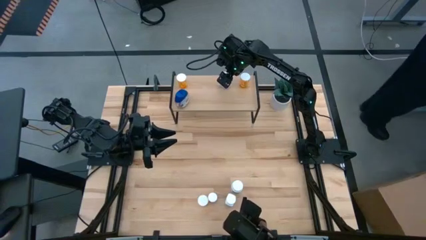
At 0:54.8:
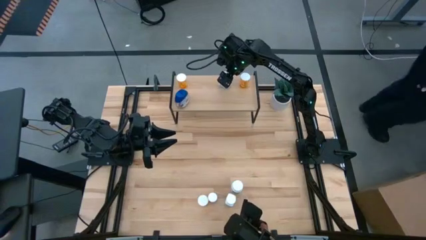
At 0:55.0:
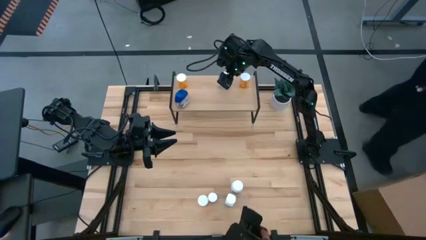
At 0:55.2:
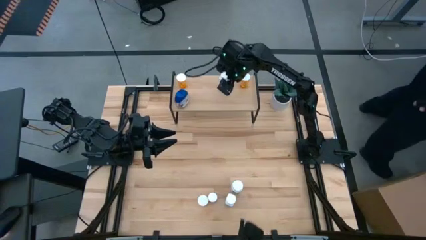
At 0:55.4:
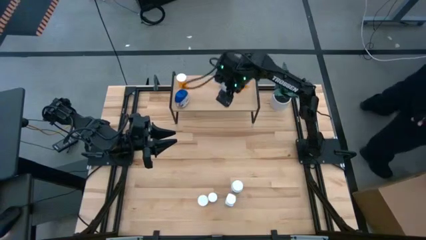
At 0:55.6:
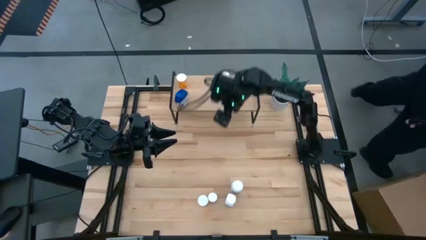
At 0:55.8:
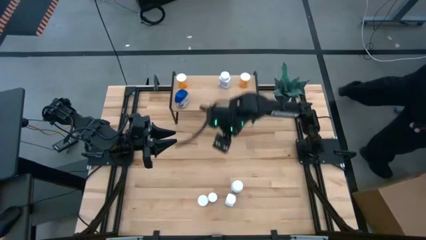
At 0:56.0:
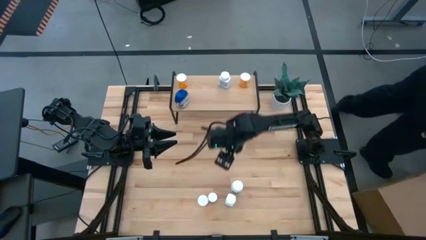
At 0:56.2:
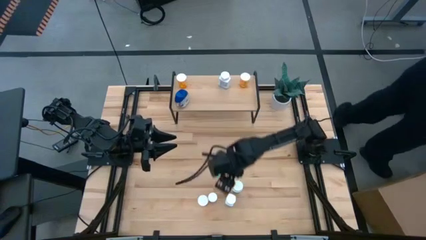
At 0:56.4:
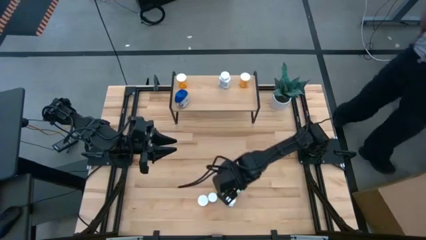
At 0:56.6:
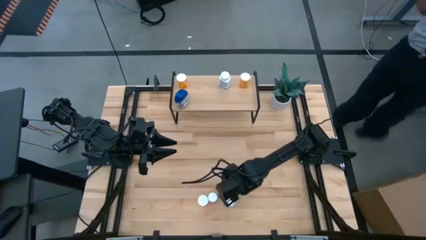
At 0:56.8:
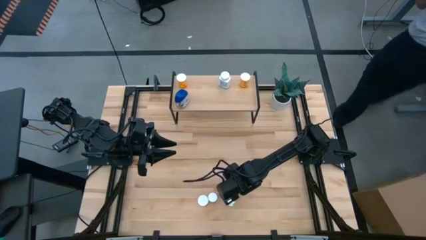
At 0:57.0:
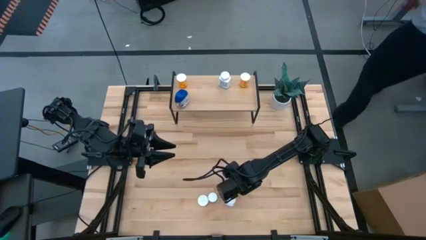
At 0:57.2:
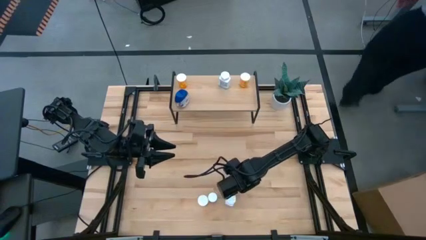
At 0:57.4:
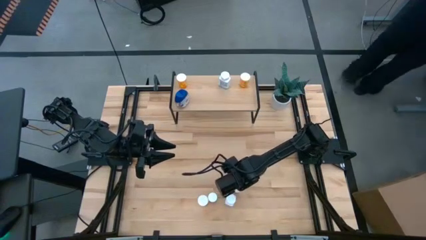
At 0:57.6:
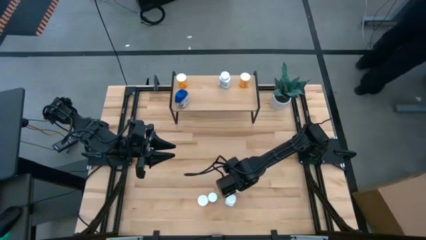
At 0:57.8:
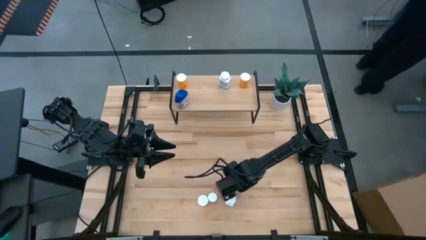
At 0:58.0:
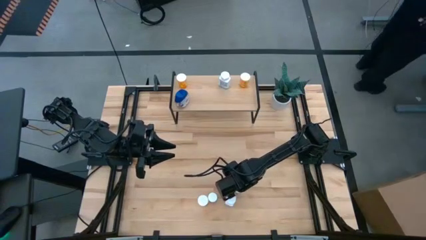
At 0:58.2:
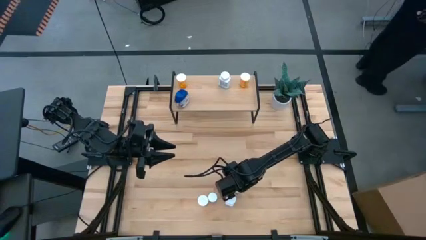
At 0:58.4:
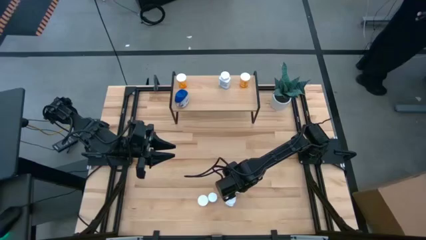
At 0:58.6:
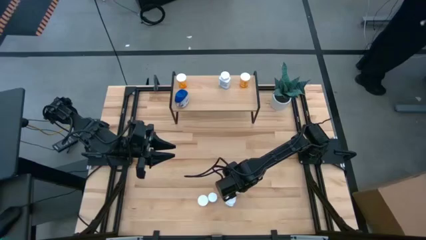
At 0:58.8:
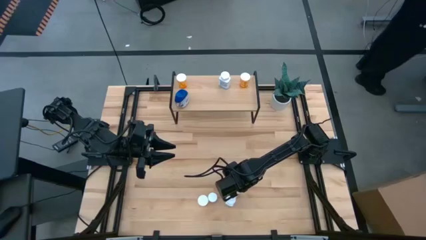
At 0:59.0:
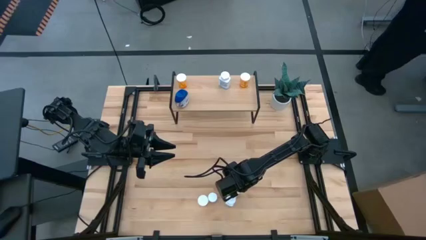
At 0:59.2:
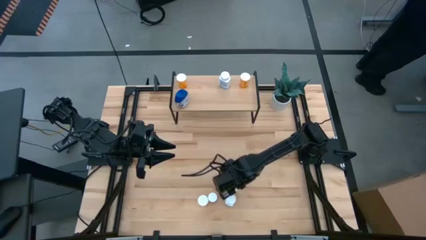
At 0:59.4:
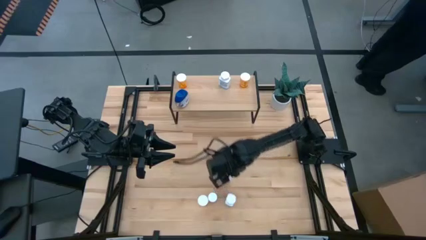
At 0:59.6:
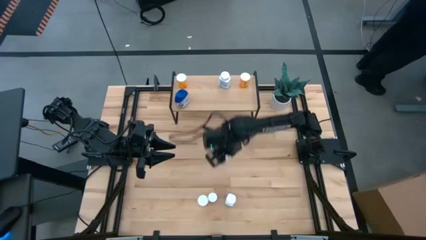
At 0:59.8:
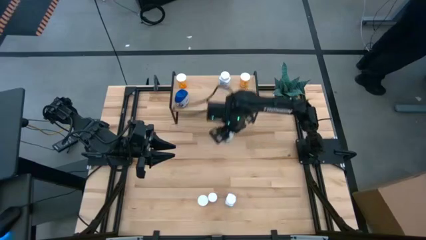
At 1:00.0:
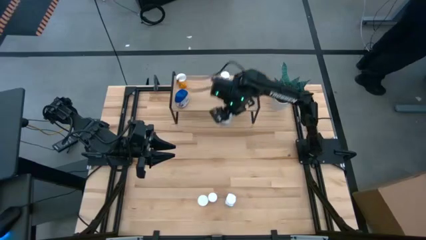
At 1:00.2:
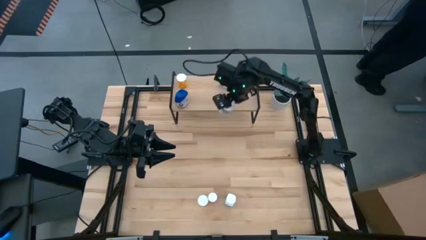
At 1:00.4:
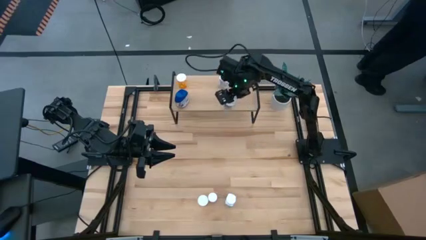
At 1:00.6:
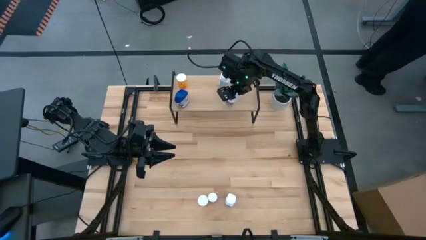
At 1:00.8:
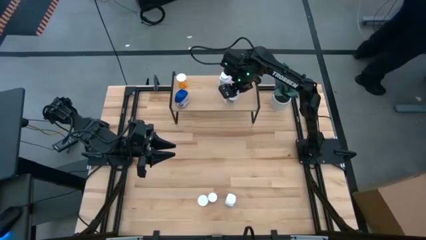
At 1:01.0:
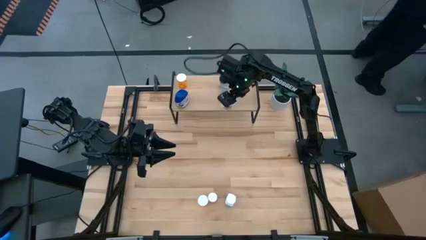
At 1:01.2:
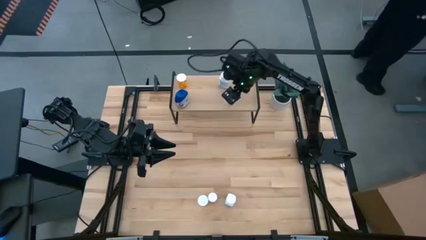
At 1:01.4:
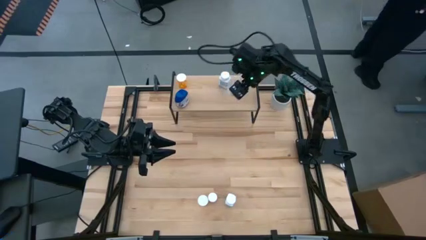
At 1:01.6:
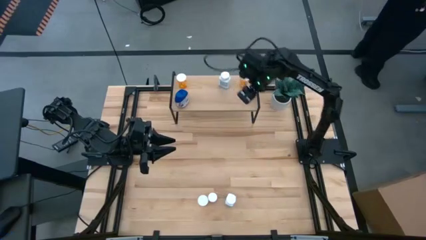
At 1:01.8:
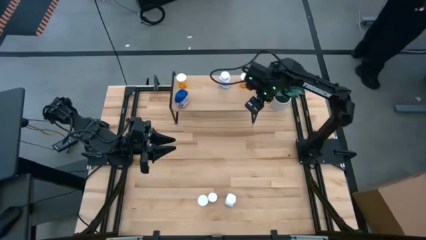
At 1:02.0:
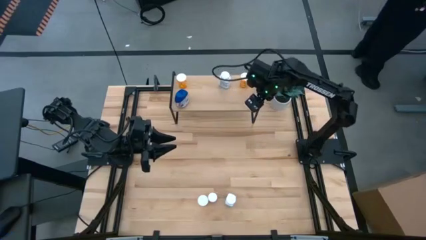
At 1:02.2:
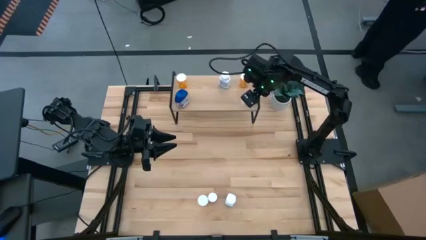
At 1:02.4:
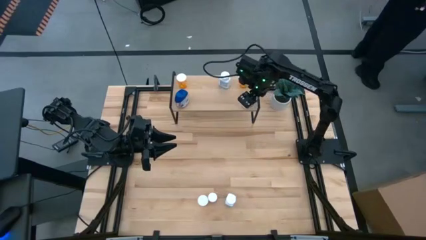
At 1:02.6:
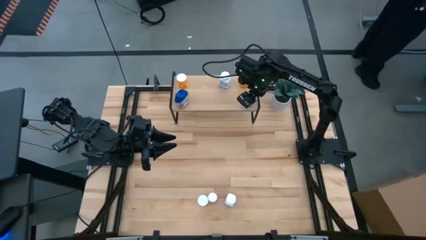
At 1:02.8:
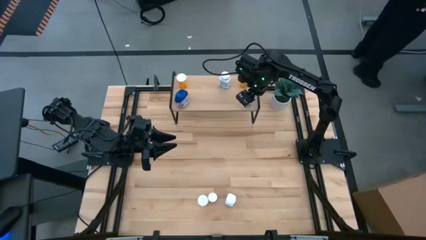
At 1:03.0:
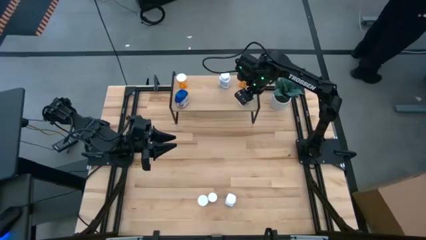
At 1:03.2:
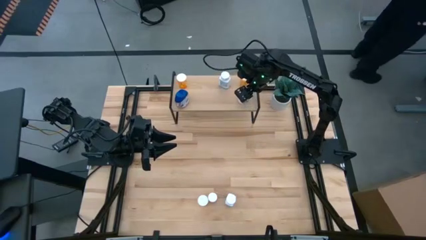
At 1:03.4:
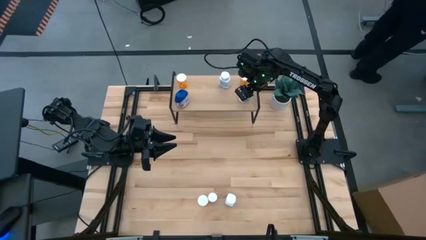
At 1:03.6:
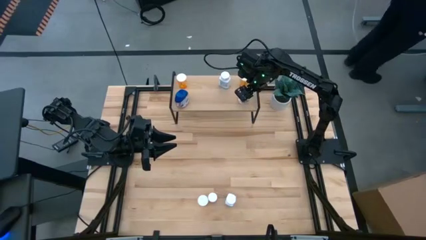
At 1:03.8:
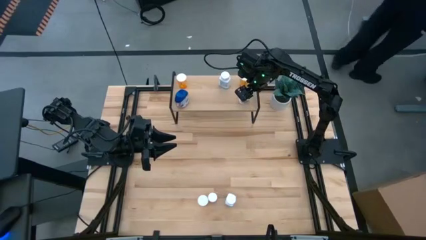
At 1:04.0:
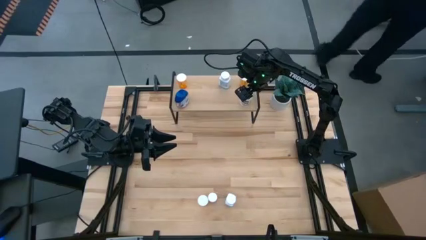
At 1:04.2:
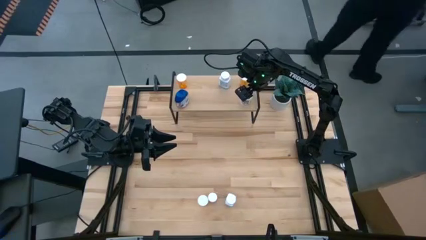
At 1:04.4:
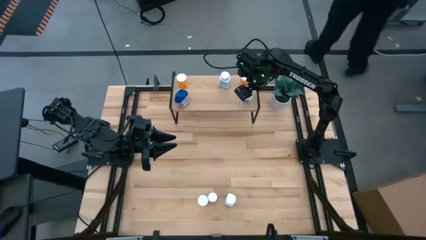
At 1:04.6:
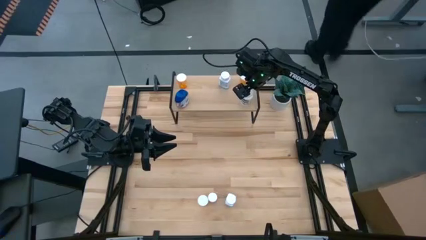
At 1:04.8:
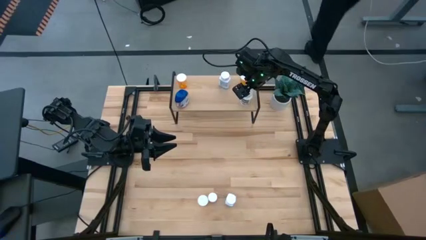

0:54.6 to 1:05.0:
Task: Pick and place medicine bottles onto shelf by color
Put the white bottle on the shelf

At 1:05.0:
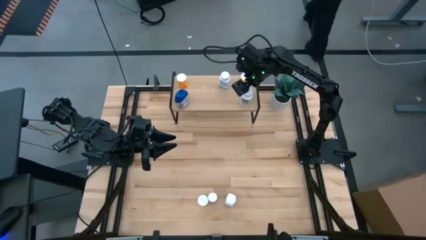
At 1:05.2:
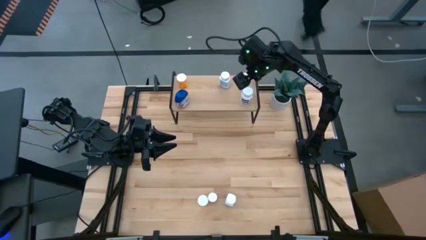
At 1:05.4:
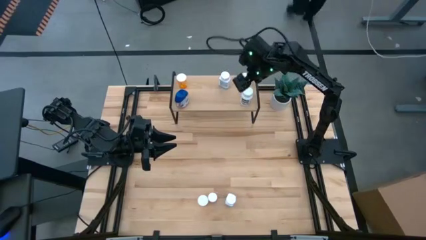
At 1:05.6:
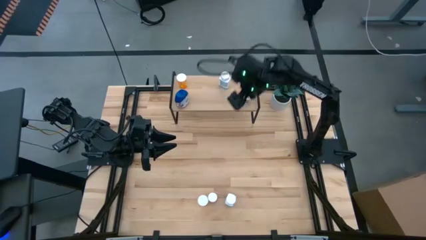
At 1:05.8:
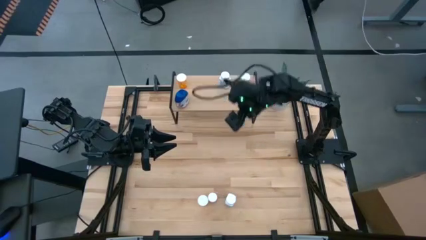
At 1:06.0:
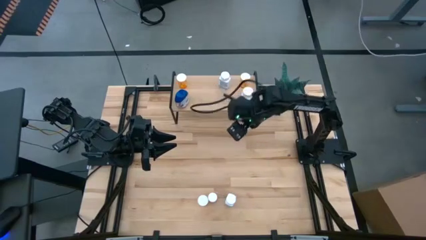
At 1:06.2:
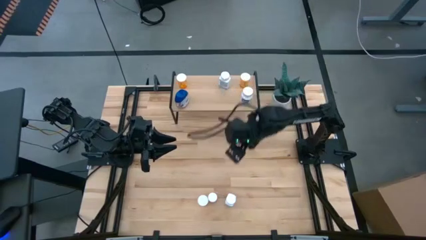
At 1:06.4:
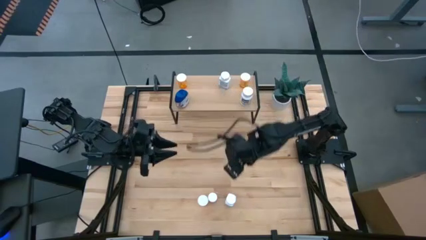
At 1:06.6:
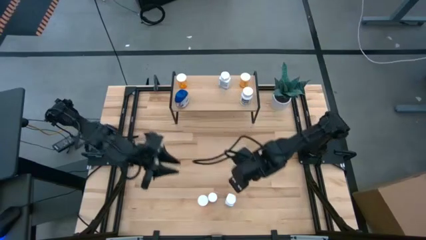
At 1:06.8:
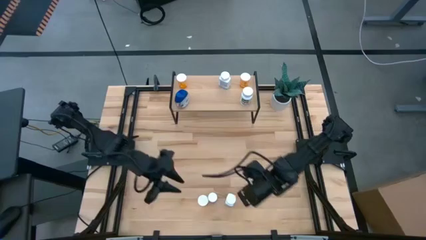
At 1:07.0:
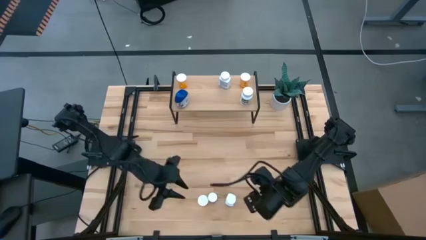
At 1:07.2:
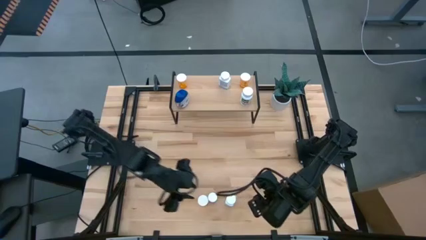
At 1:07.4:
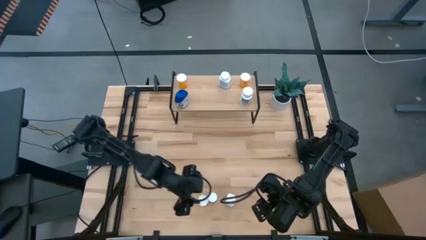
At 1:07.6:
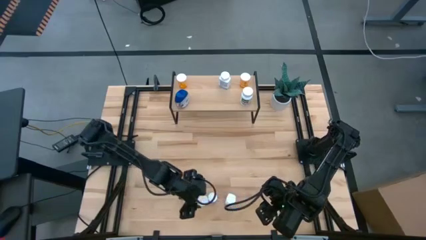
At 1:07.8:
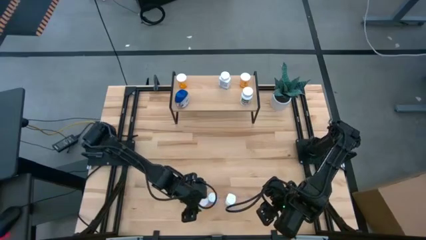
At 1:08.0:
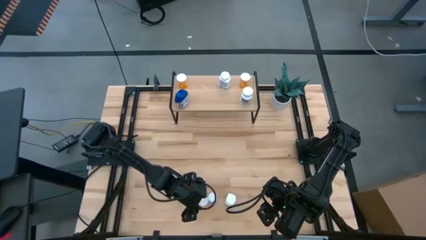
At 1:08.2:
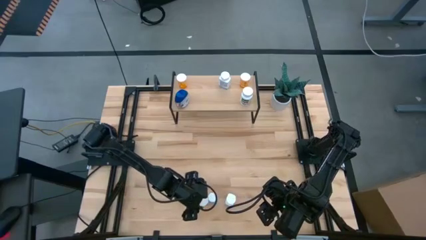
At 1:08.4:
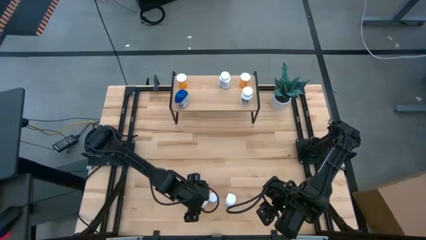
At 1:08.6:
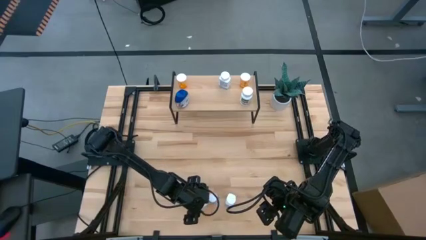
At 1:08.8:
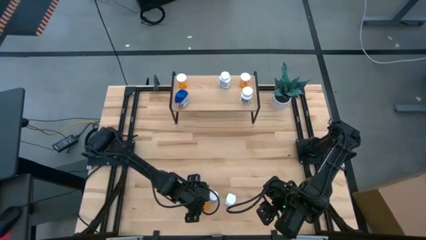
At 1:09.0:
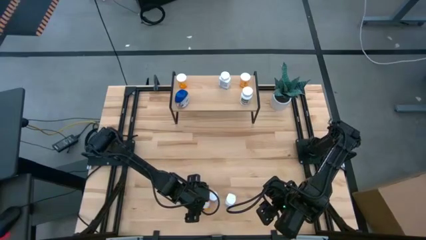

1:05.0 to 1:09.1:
Put the orange bottle on the shelf
